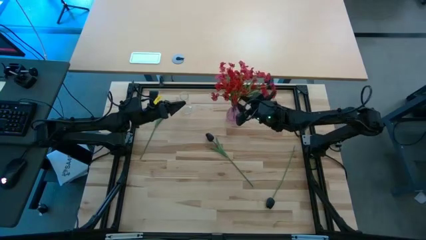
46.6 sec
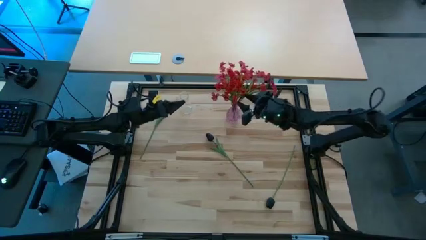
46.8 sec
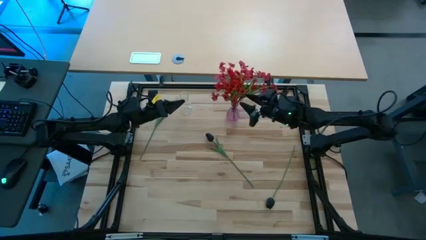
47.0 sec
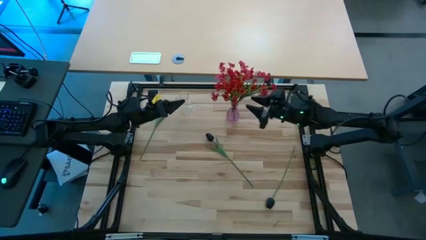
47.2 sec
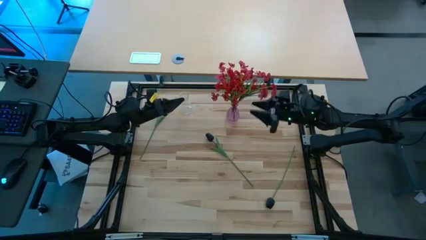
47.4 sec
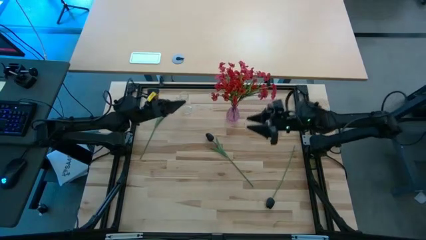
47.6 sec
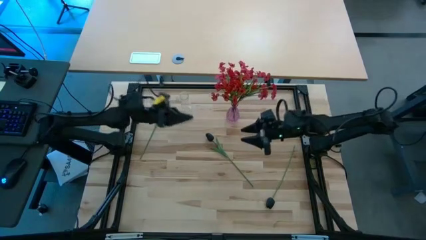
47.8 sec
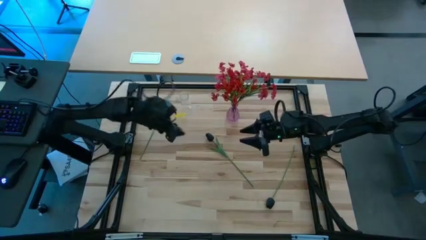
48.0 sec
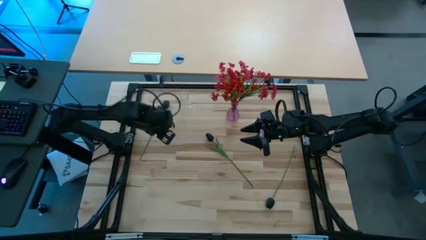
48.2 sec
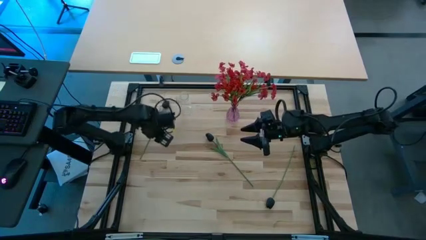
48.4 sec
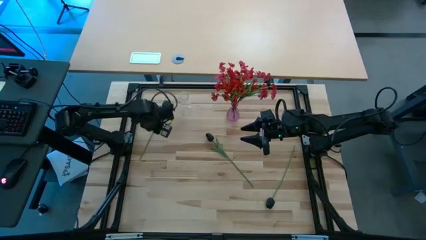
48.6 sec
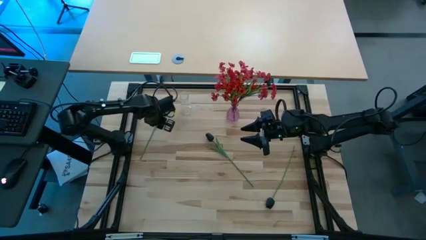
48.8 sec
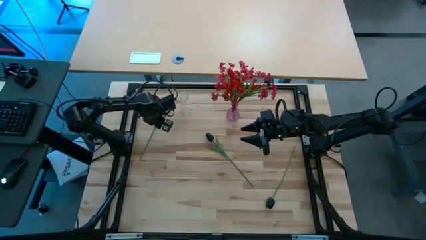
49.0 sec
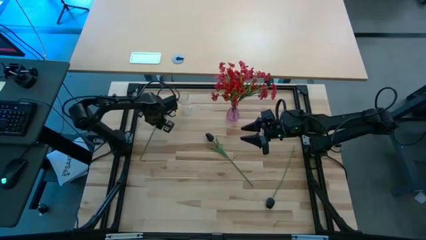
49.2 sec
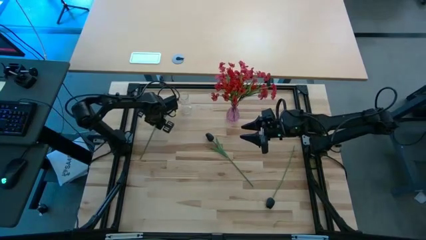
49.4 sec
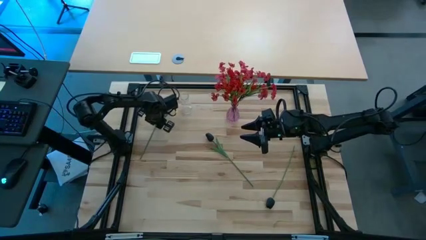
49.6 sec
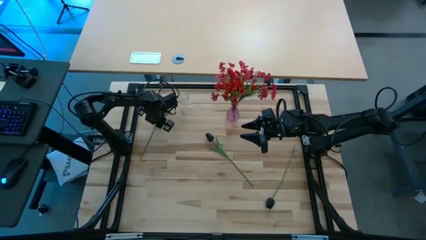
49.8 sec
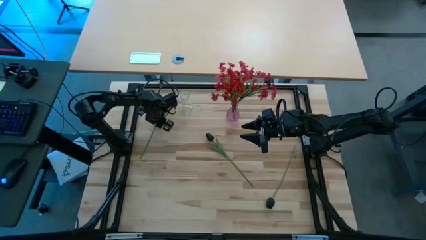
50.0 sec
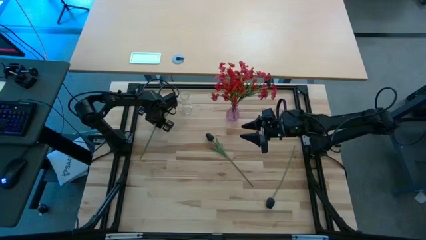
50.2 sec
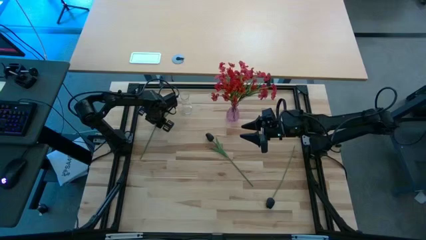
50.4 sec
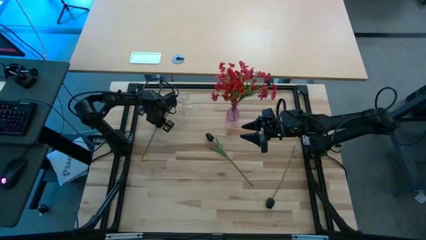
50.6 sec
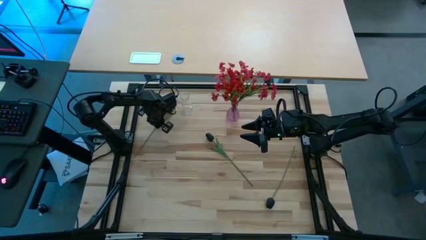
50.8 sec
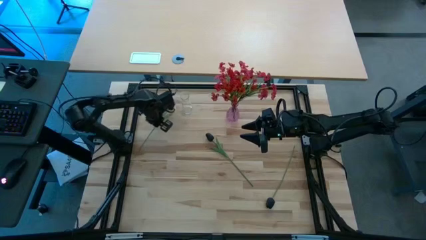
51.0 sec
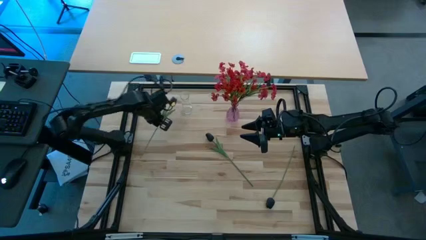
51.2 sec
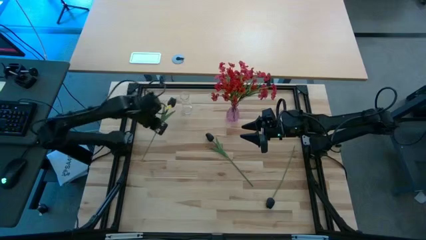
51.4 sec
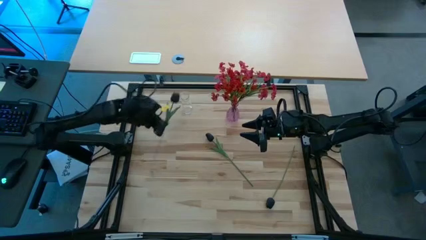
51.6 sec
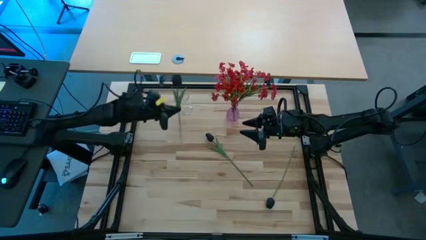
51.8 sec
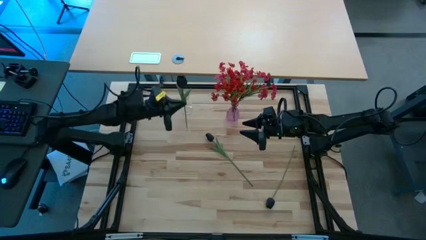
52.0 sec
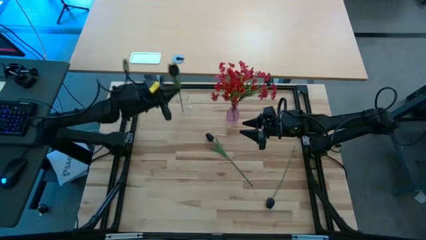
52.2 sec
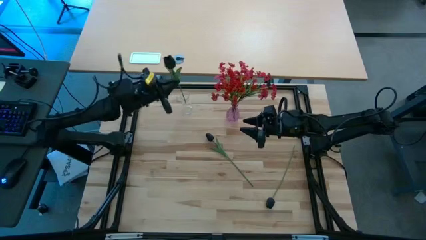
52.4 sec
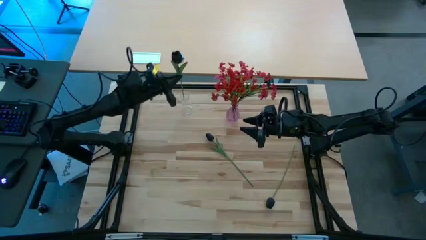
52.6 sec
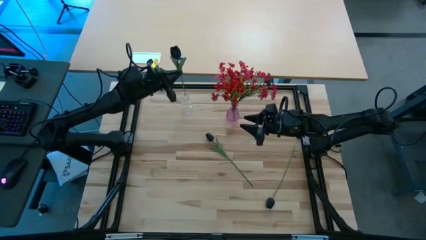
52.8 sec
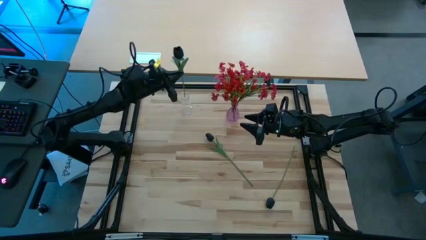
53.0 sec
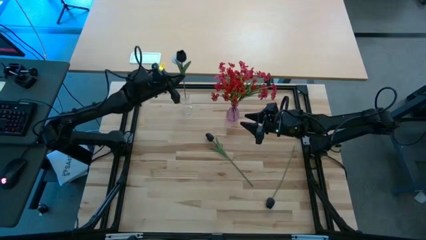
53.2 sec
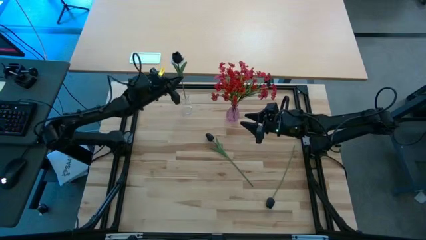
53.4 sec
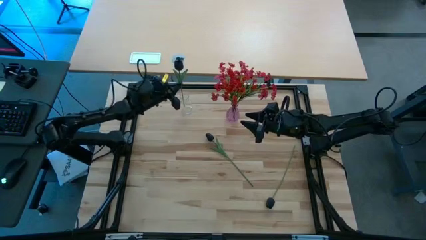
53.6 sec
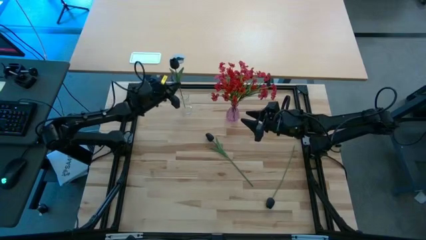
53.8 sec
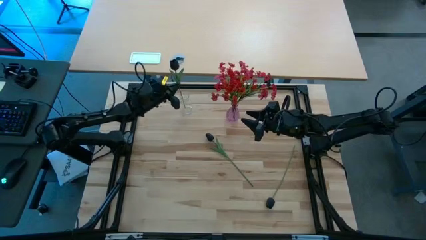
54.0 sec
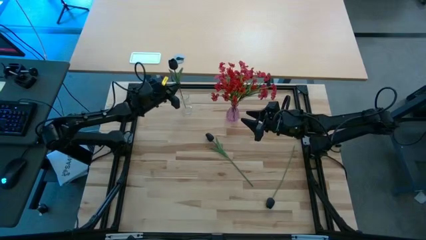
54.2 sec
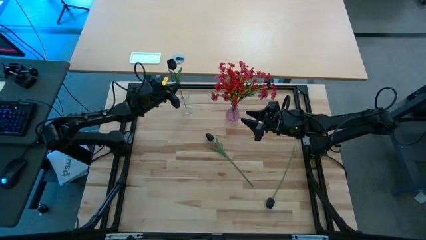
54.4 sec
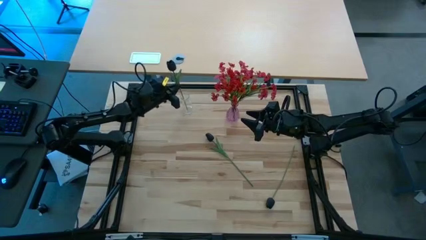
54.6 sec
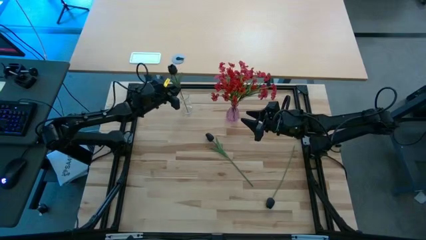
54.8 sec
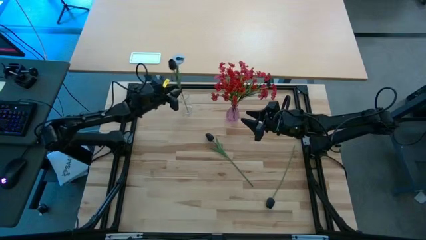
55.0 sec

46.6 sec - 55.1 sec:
Task: Sort flowers into vase by color
Put the top black tulip into the transparent vase

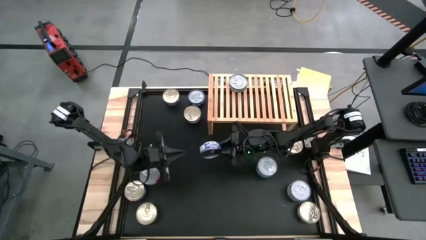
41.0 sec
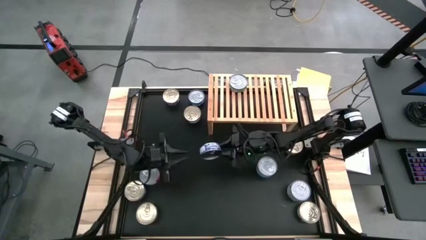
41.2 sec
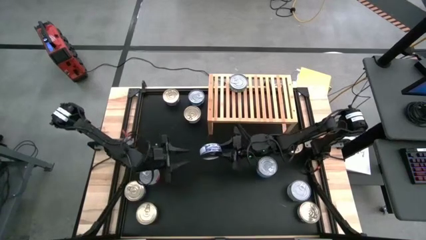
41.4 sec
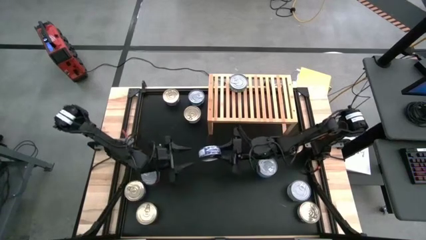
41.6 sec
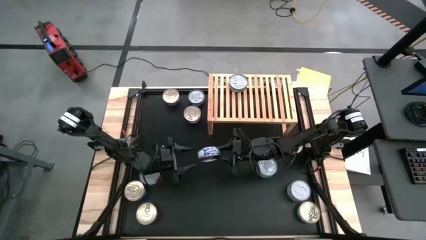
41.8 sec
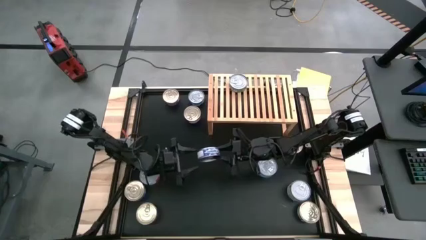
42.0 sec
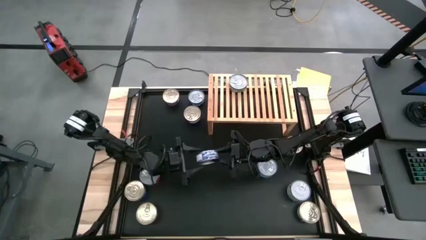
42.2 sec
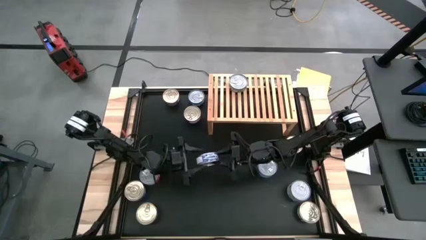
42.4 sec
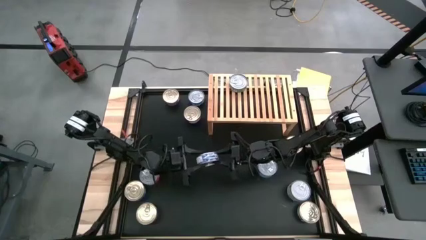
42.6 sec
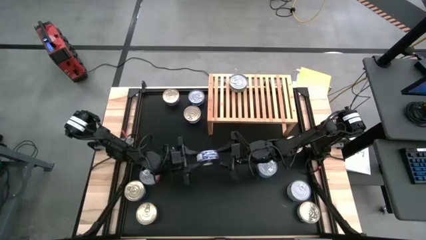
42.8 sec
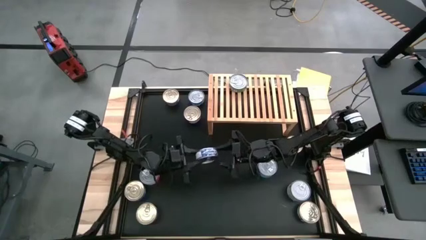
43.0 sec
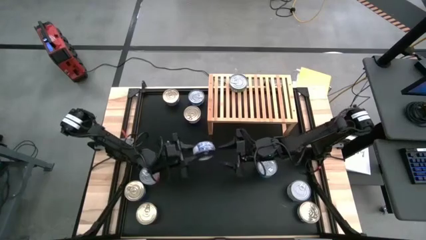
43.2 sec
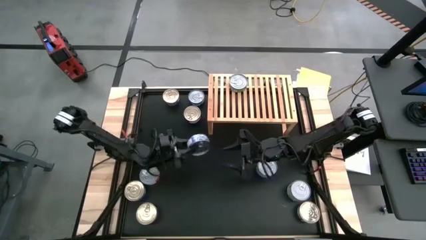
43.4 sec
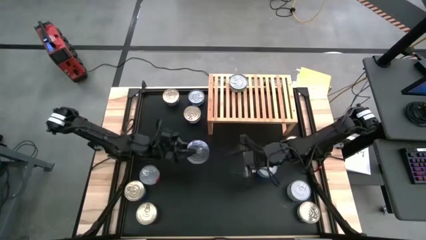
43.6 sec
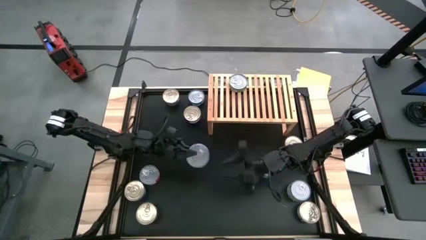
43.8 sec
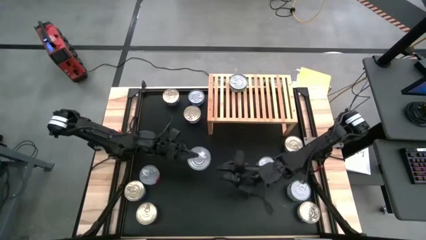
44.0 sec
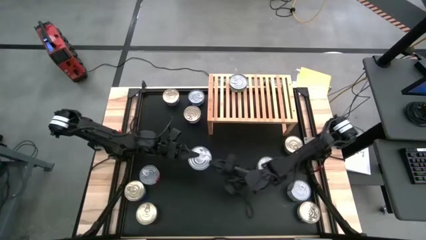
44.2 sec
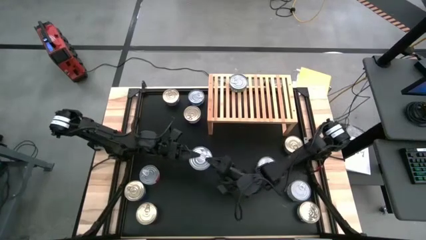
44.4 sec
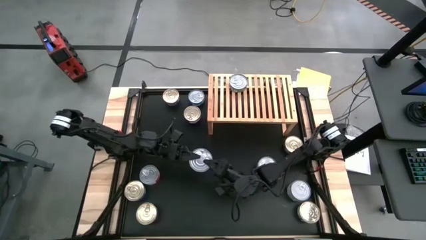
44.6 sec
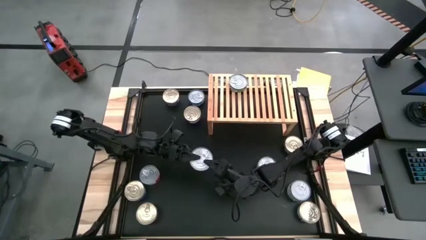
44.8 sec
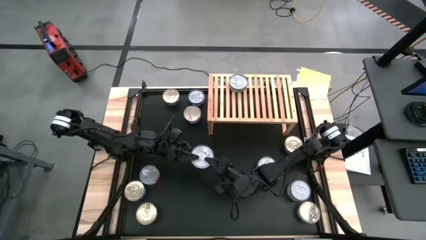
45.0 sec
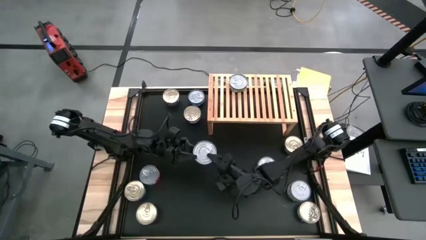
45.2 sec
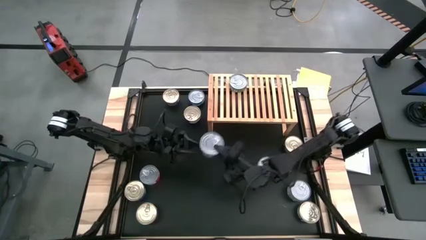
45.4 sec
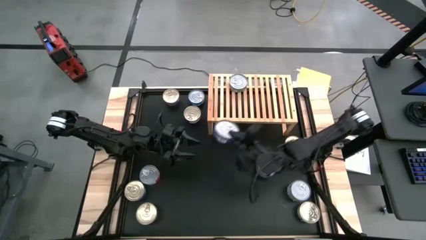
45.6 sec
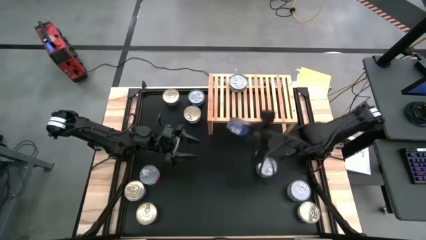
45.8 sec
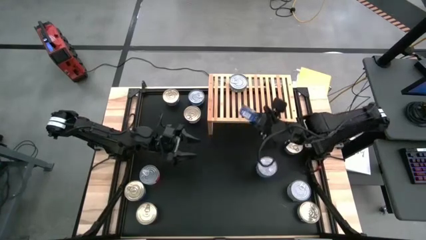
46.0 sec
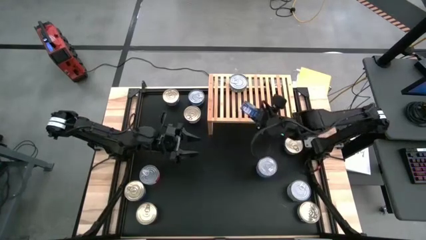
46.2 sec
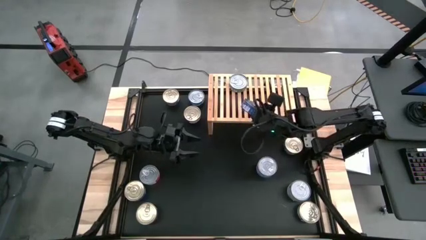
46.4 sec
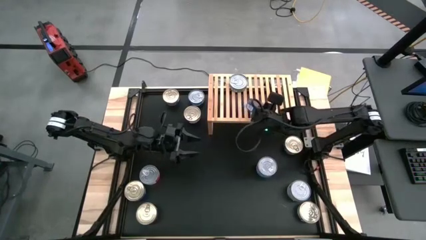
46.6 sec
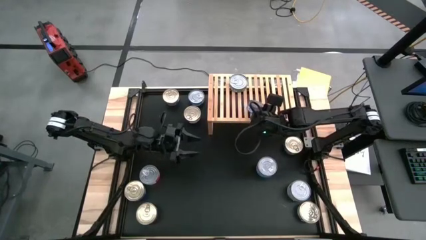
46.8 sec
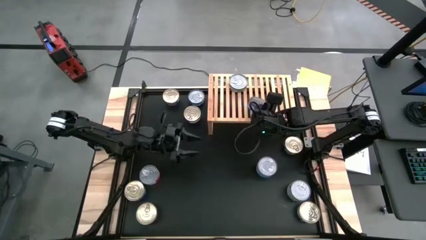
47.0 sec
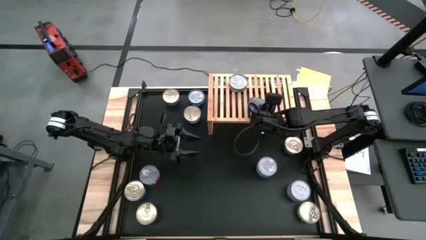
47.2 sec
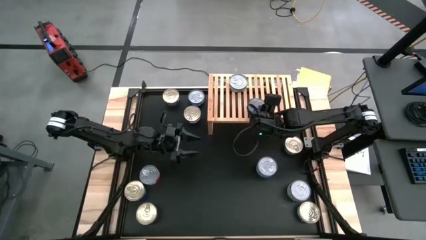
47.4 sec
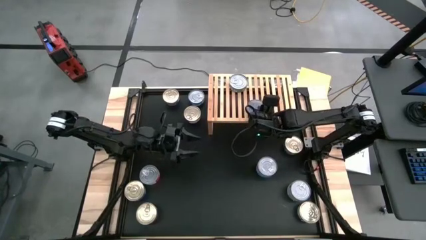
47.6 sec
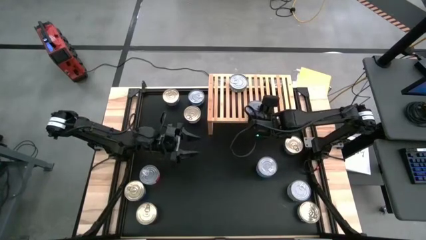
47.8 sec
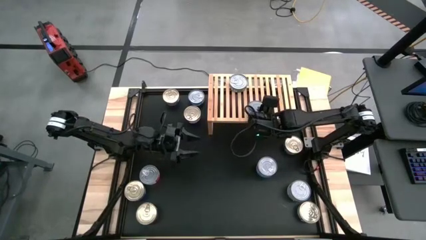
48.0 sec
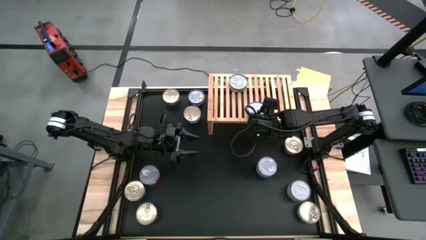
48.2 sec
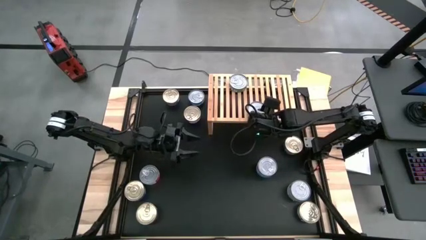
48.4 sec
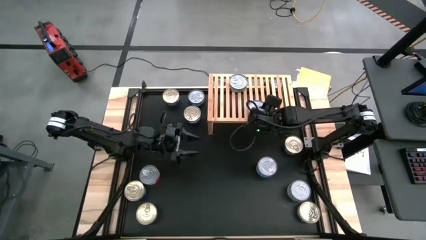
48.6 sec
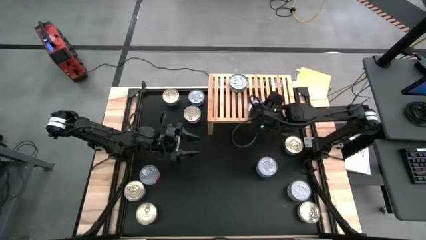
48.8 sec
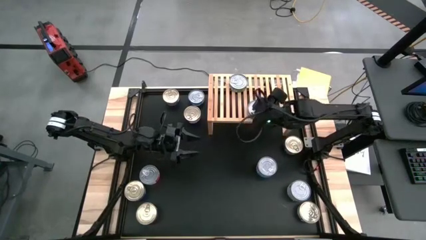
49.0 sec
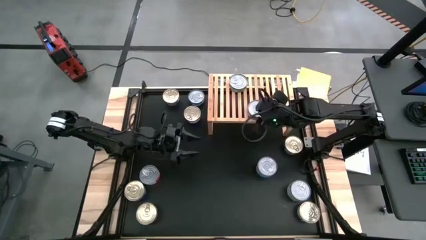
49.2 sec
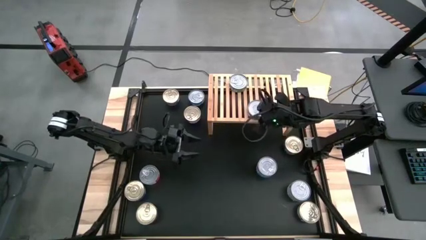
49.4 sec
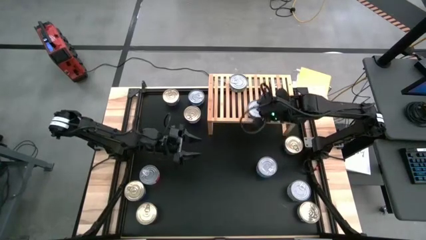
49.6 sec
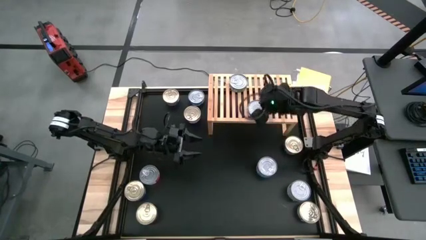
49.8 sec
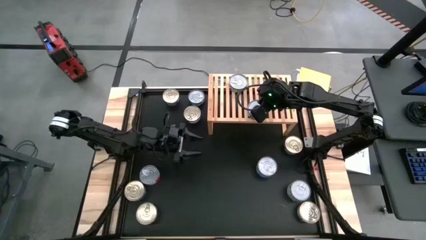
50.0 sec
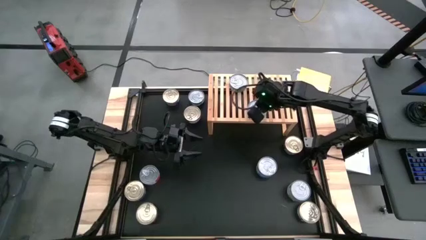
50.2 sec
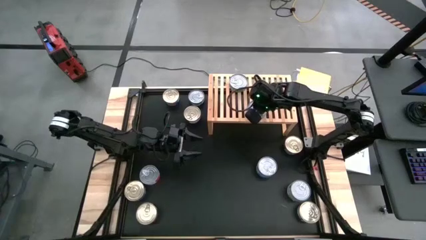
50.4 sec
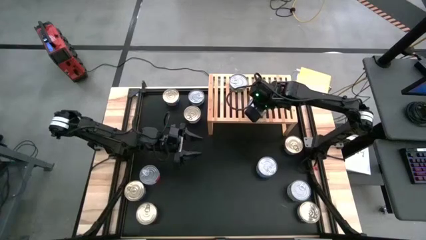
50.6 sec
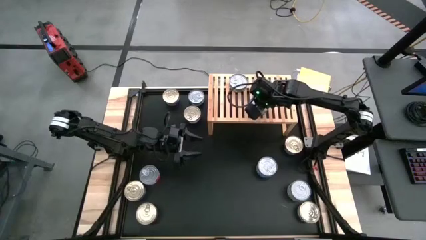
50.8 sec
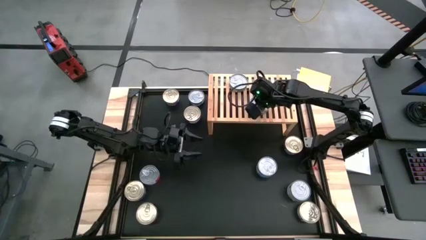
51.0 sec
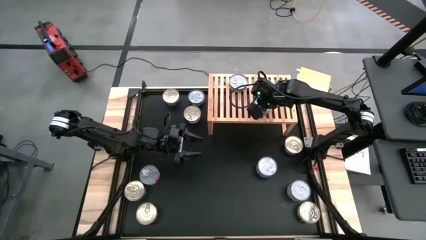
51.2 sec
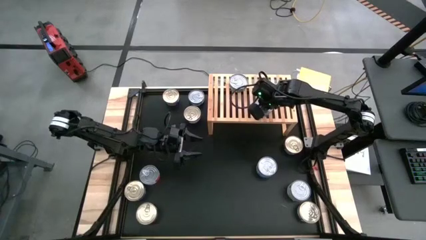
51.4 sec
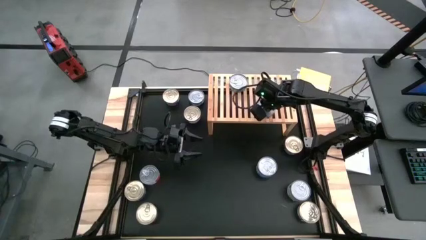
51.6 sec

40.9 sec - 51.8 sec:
Task: Stack canned seafood by type on shelf
Put the blue tuna can on the shelf
